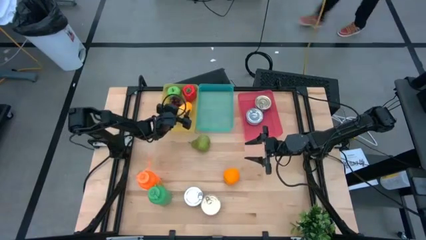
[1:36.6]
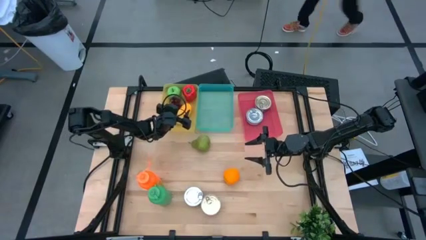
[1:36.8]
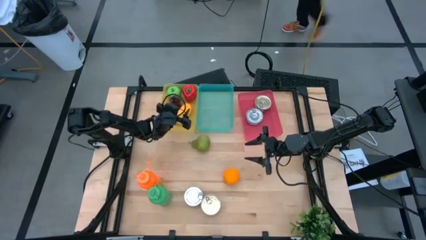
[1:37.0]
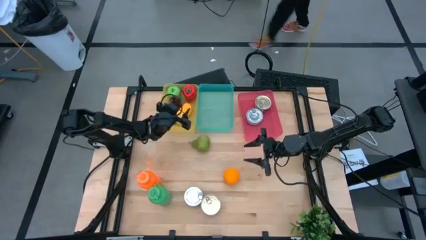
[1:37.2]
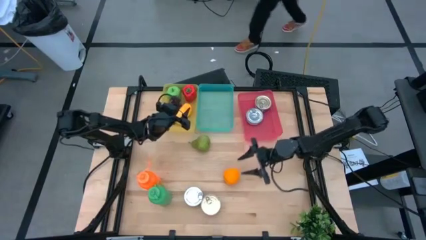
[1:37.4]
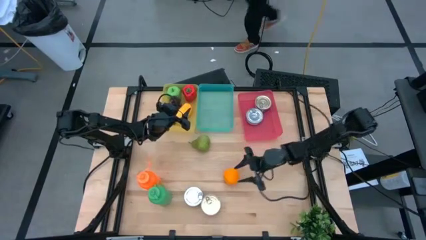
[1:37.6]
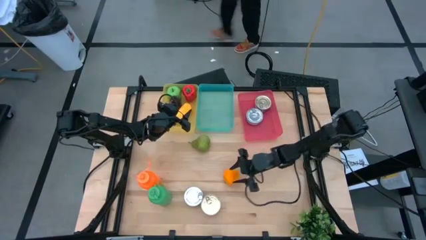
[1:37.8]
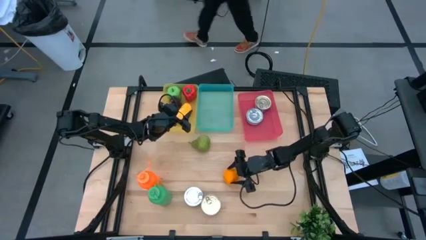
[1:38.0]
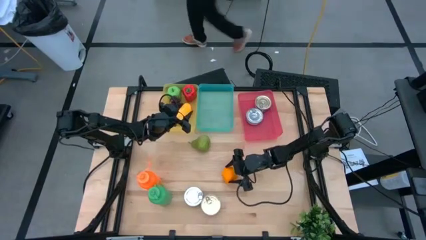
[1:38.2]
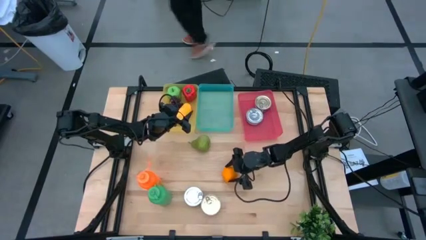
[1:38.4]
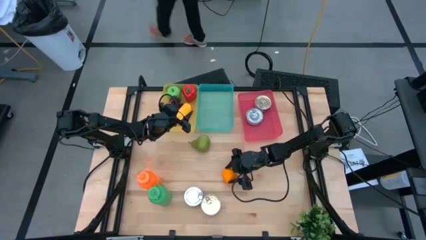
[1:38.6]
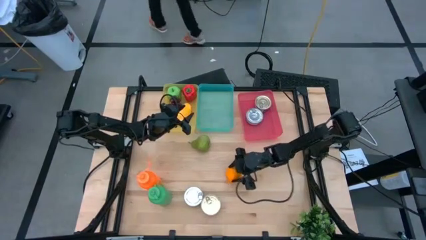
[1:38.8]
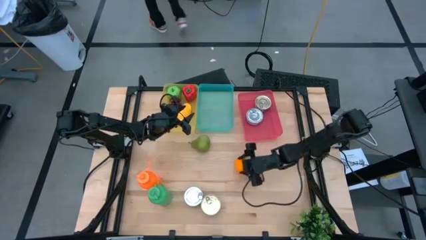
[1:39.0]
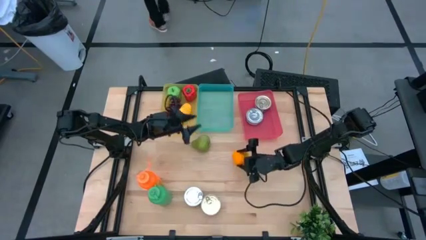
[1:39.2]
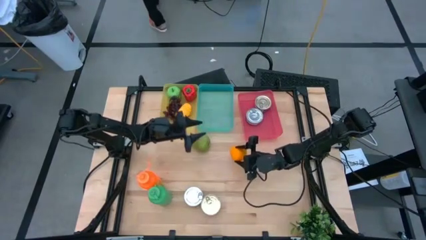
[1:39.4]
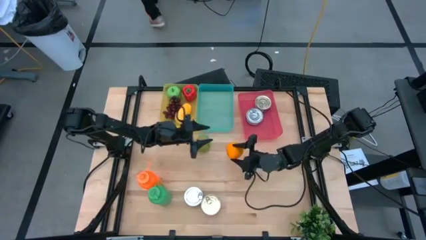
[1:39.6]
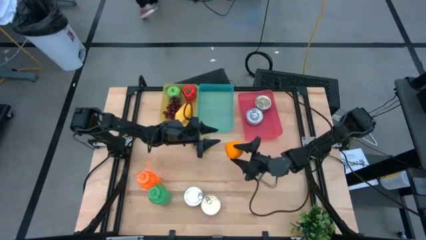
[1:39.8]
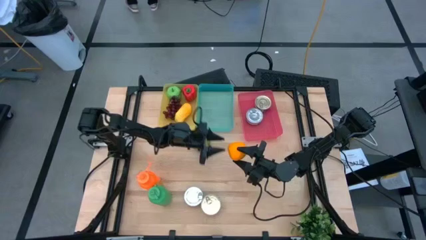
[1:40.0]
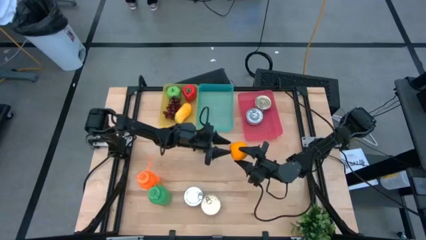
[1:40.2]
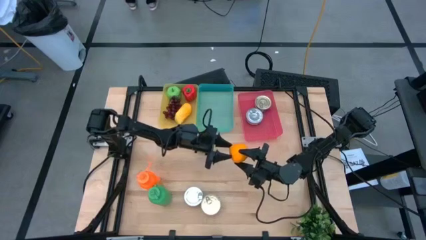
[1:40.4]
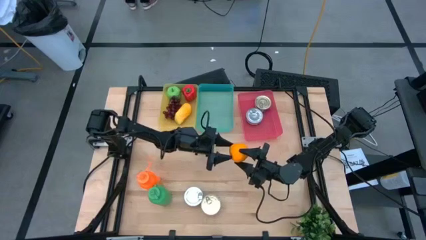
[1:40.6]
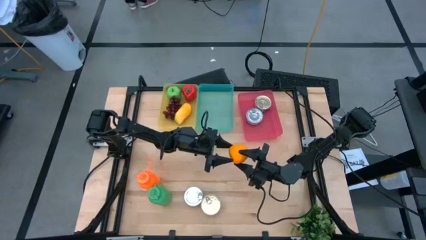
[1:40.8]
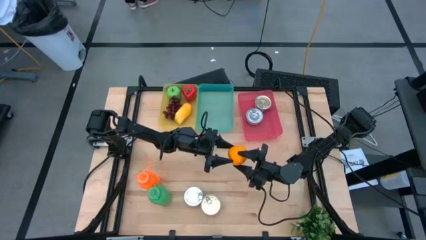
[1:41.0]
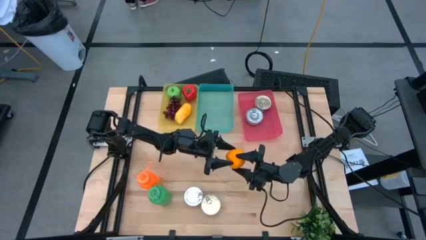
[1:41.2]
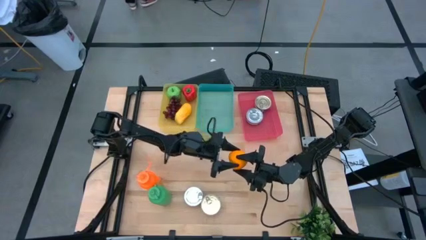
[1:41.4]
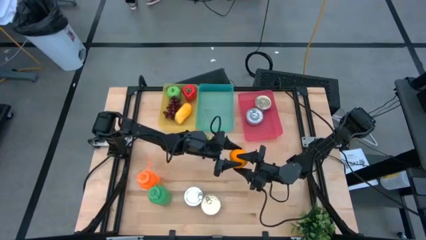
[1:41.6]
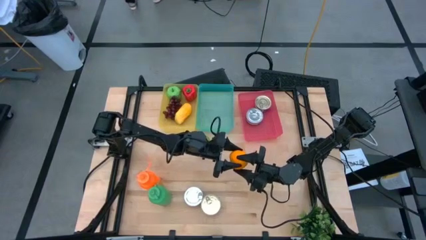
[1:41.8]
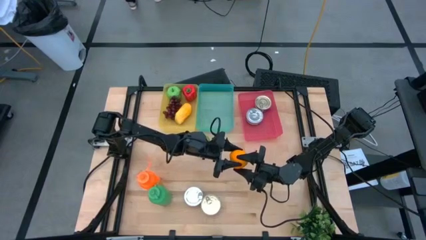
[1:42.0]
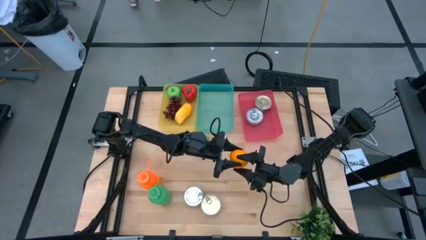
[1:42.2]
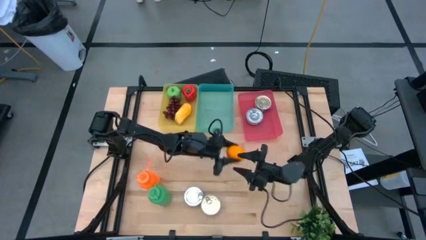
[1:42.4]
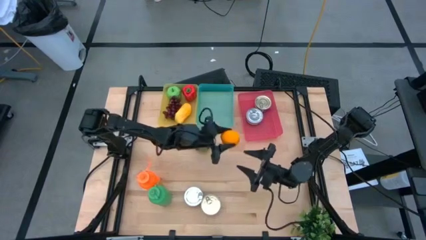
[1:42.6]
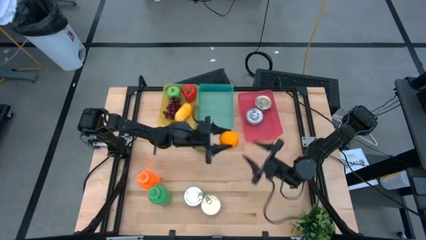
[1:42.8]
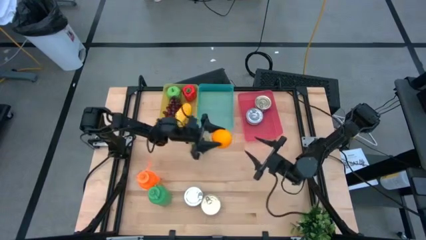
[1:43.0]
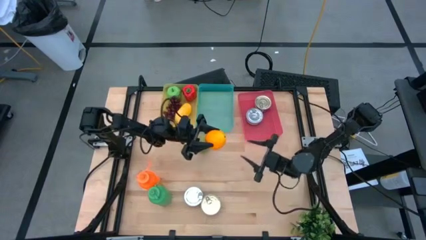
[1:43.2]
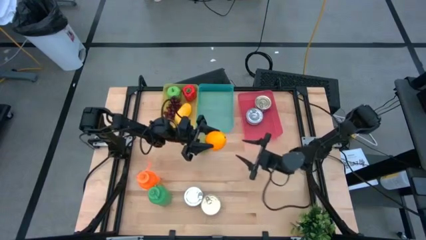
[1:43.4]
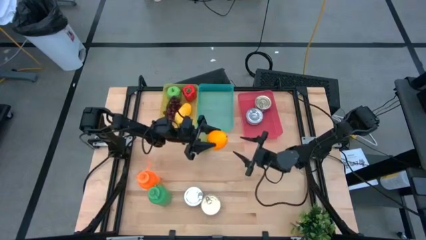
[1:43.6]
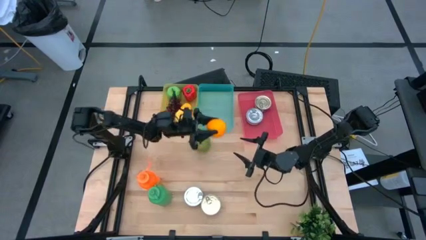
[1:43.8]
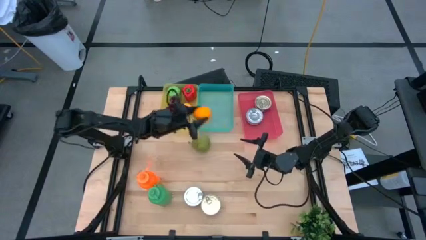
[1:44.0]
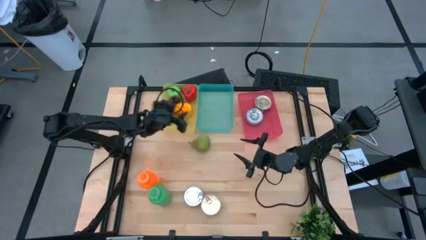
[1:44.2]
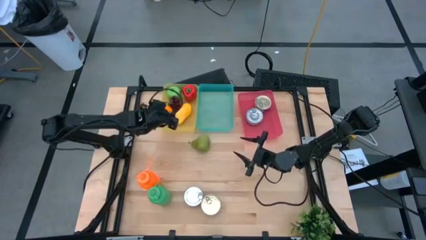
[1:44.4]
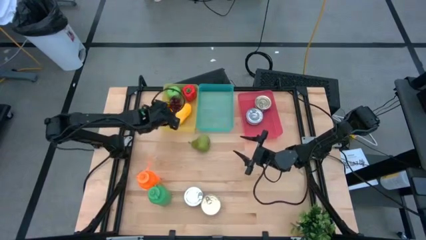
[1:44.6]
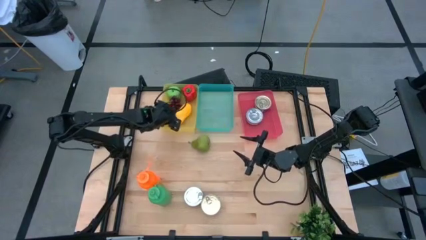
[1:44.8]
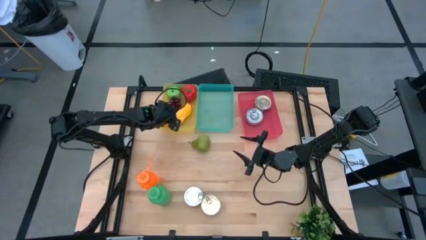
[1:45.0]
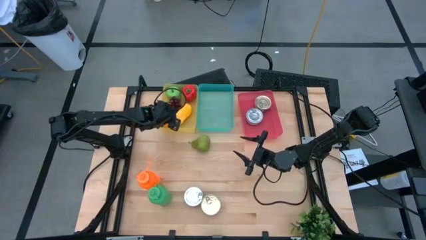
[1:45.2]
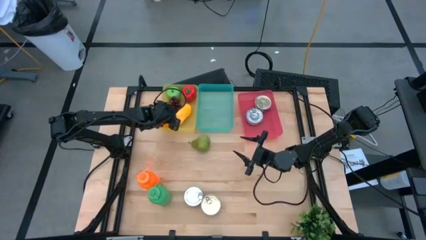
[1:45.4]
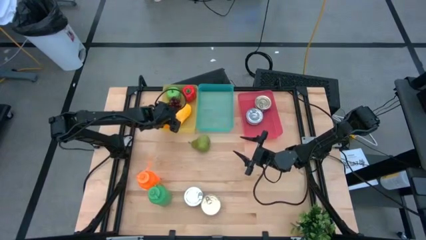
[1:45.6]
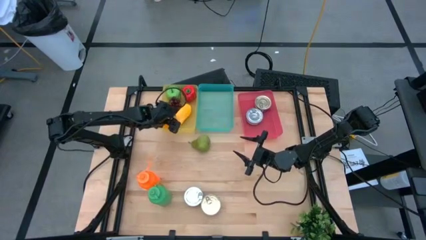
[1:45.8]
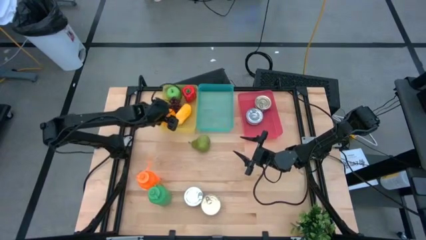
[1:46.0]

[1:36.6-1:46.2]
Task: Pick & Place Food Item
Put the orange into the yellow bin

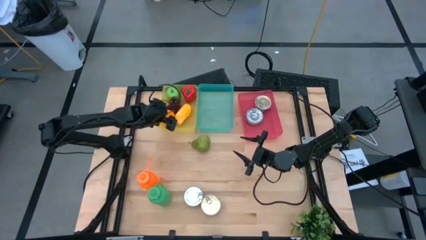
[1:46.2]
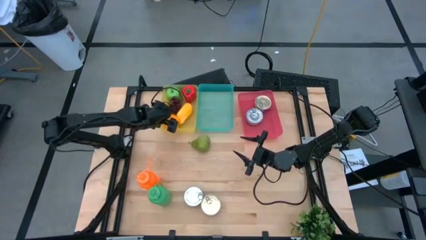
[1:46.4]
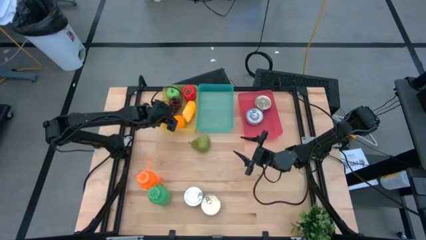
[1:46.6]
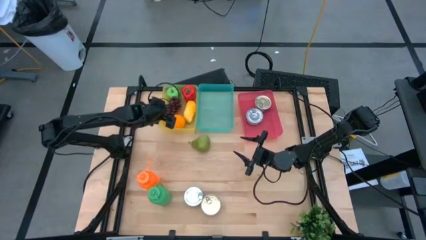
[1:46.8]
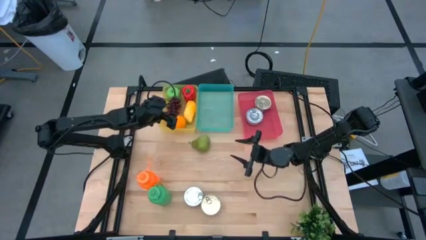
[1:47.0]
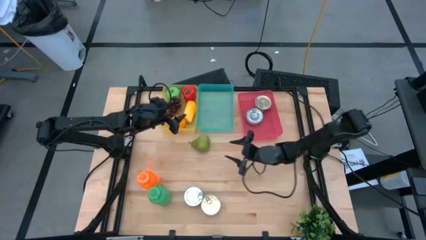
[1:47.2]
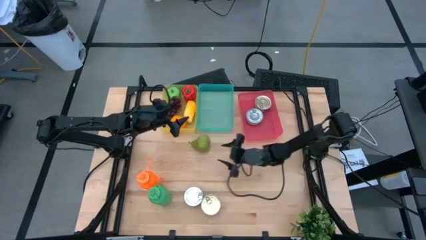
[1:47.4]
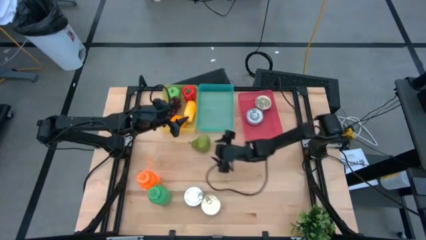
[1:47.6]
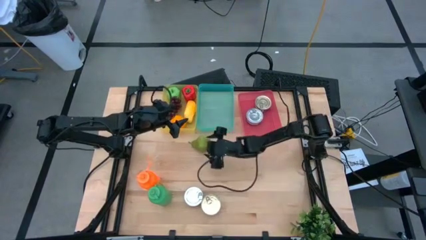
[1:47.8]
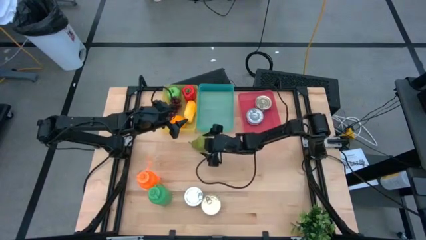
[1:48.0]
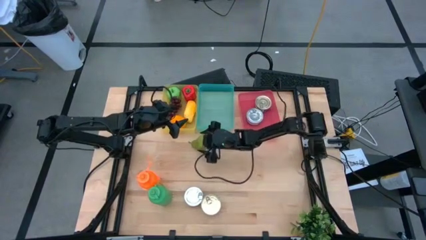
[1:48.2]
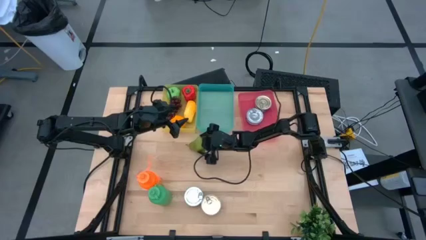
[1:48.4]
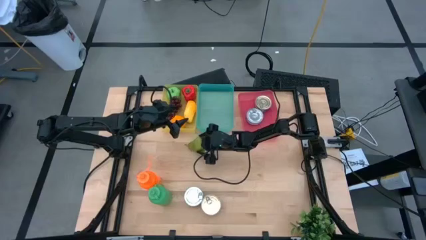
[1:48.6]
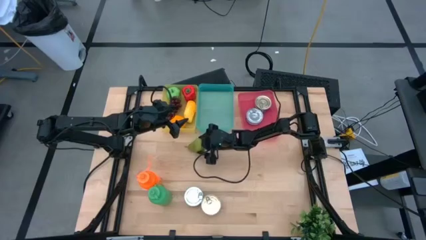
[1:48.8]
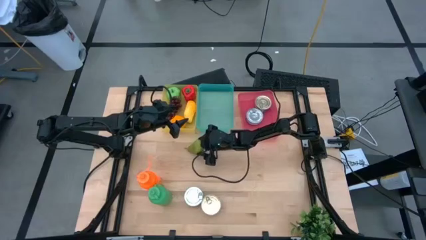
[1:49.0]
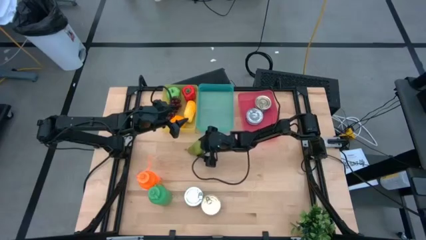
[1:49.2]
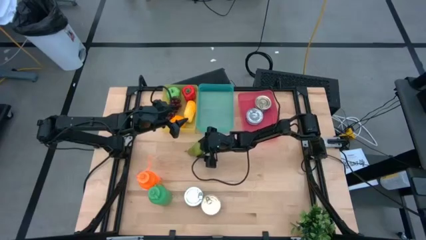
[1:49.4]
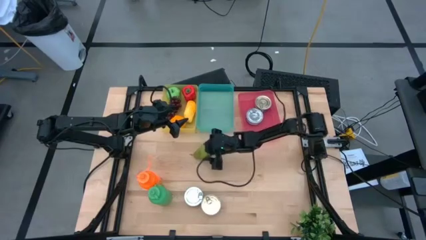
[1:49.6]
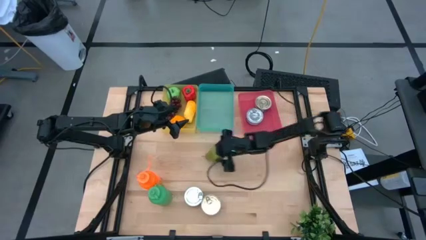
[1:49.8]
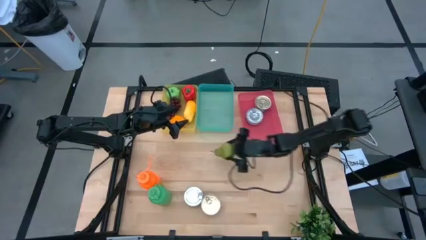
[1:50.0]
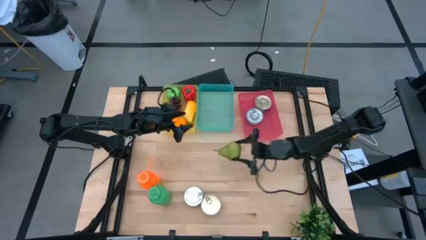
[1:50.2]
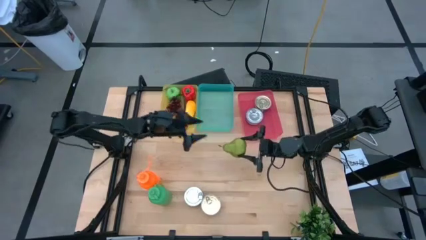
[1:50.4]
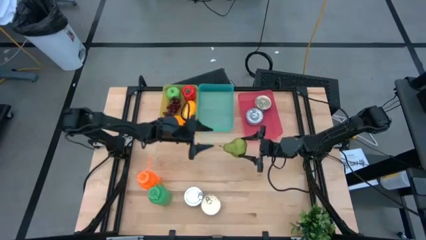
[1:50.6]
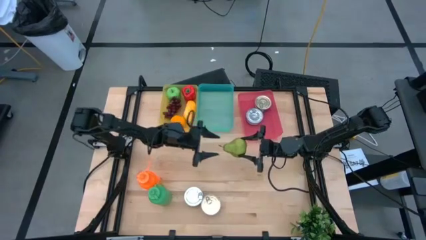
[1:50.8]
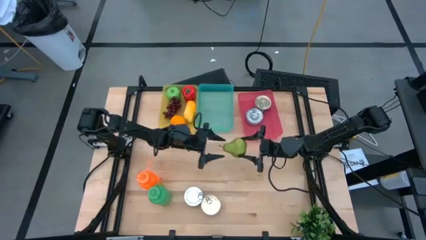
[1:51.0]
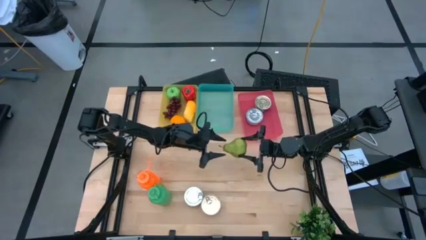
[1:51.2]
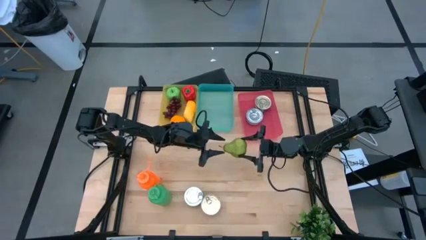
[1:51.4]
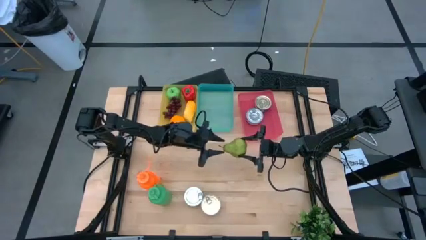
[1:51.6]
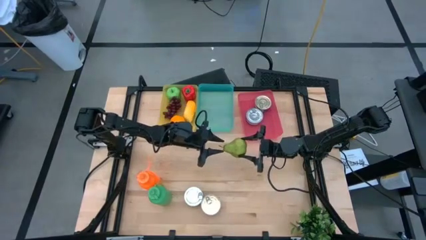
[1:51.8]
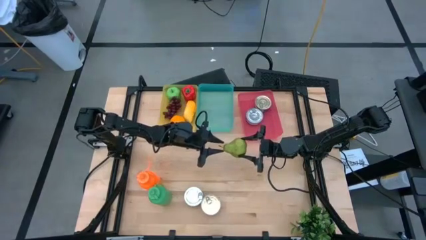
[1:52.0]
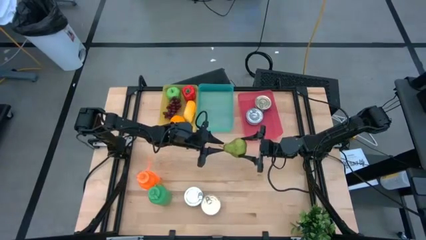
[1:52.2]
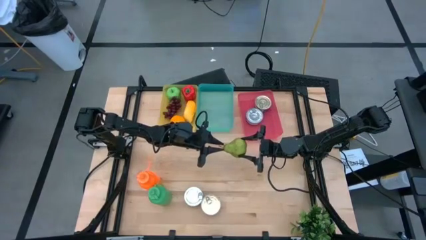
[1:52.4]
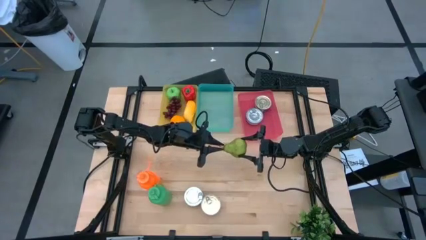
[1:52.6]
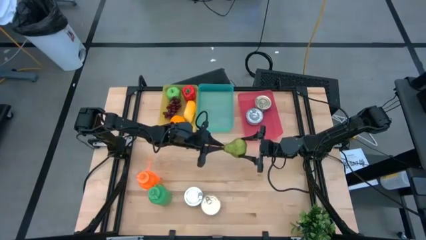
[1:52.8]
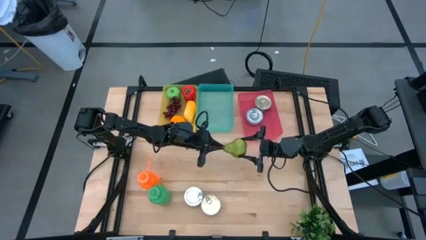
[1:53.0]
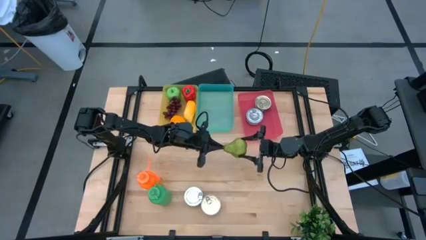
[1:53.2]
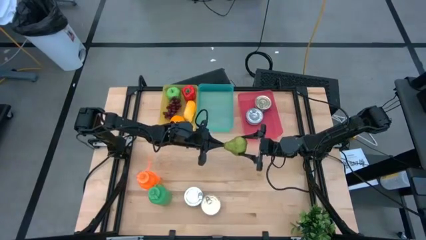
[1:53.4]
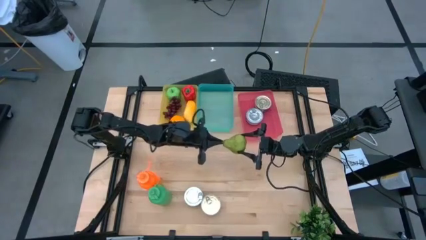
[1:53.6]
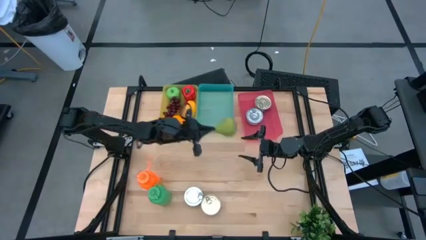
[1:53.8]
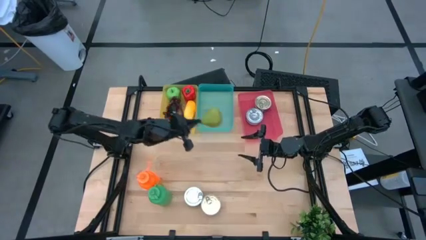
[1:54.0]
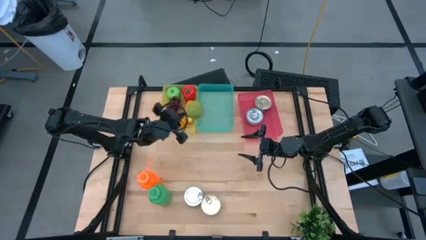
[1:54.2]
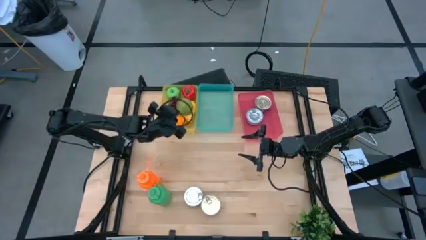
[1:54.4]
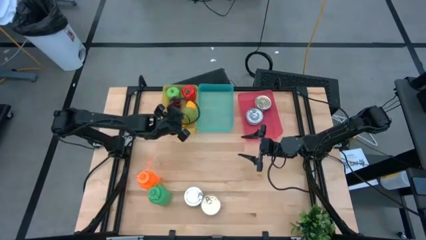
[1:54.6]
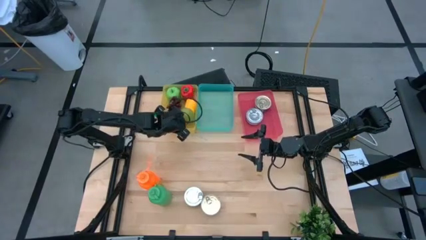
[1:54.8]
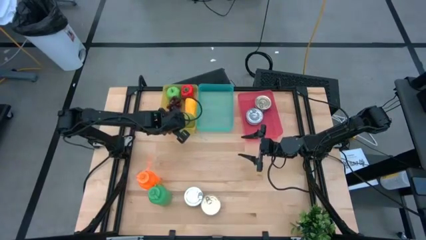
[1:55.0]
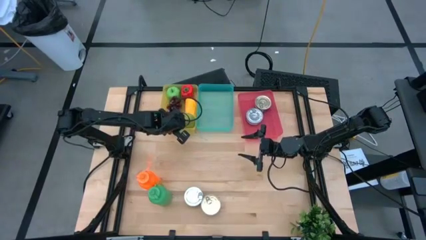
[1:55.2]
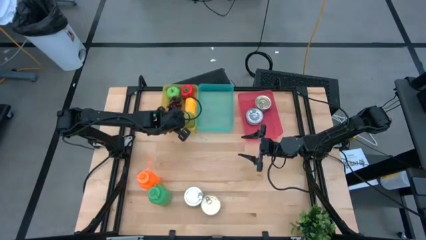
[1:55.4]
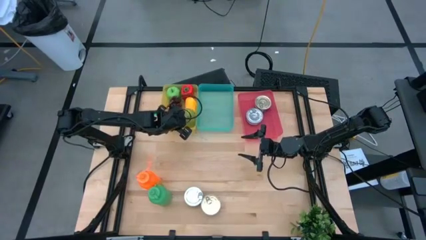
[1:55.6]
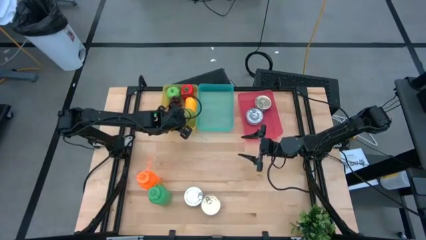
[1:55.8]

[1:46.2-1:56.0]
Put the green pear into the yellow bin
